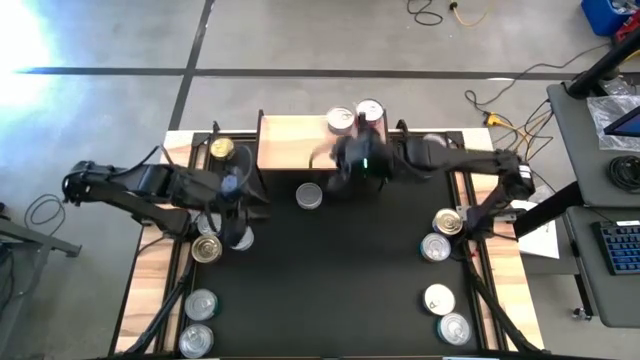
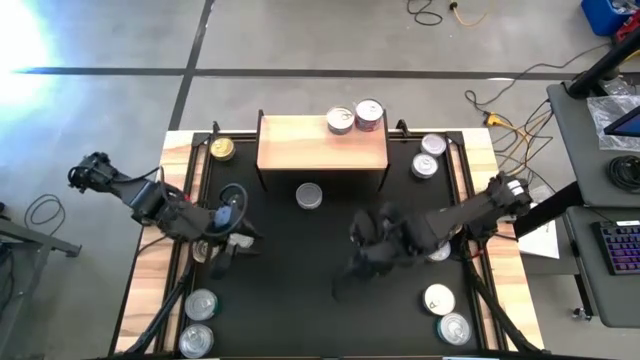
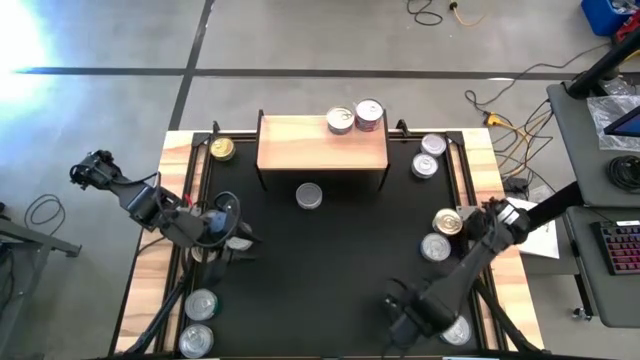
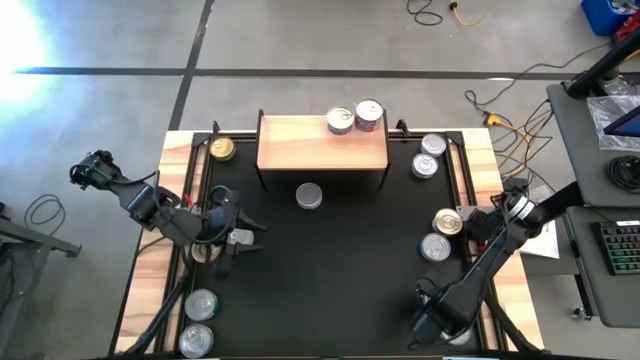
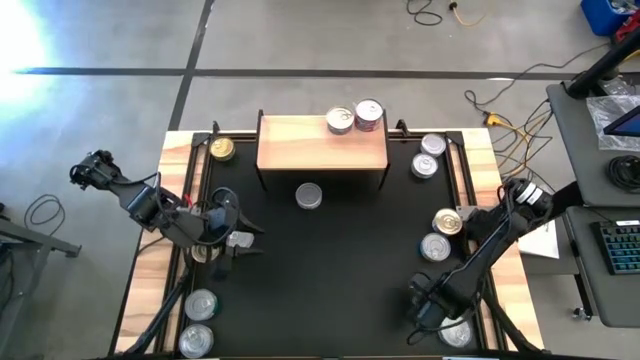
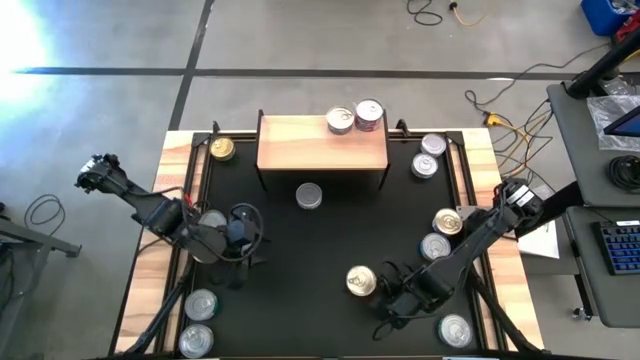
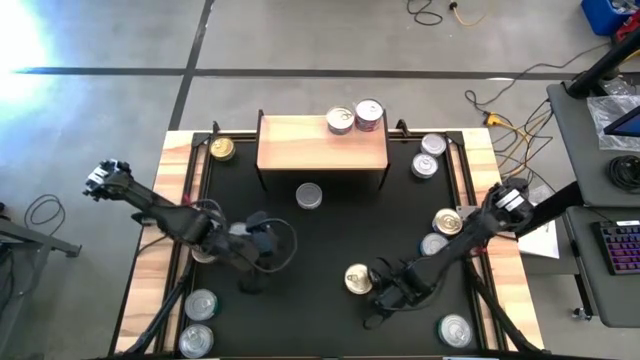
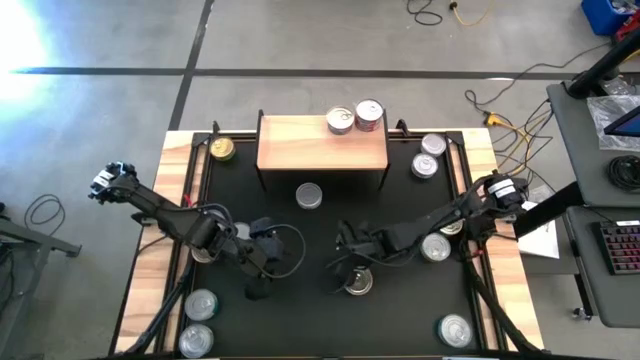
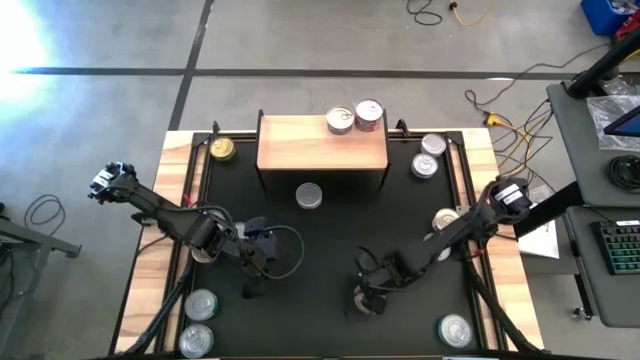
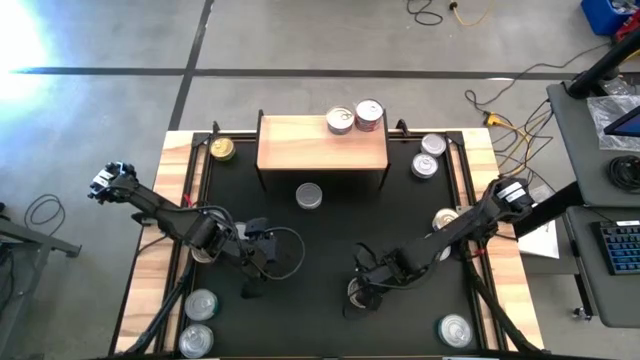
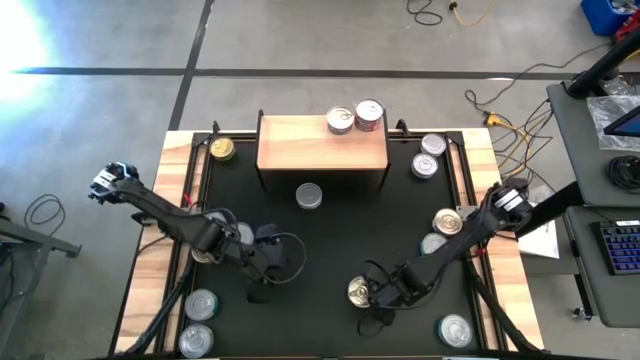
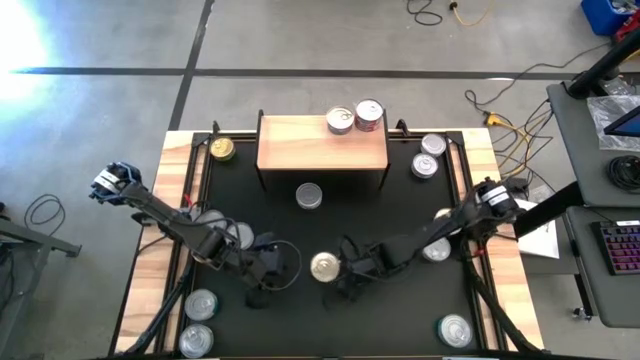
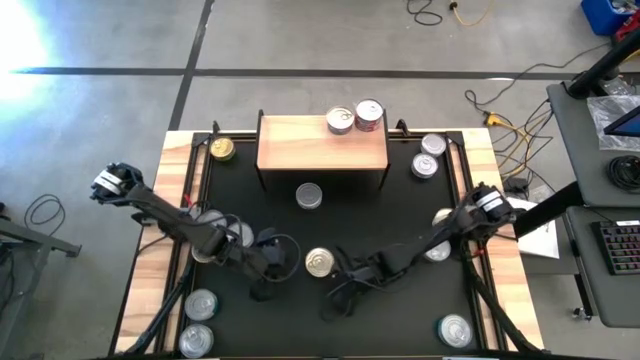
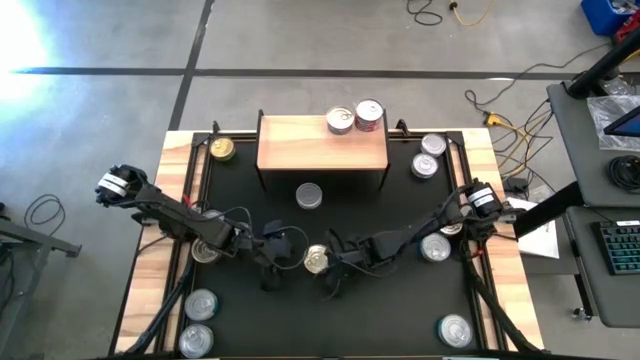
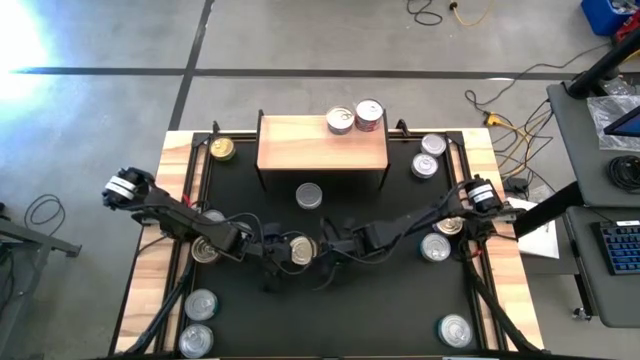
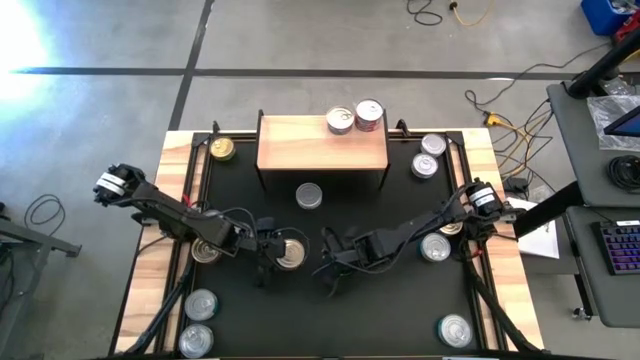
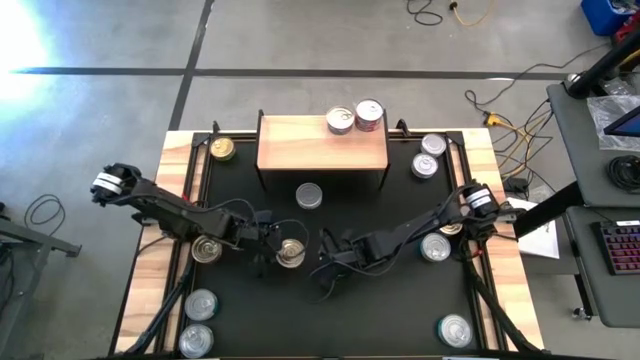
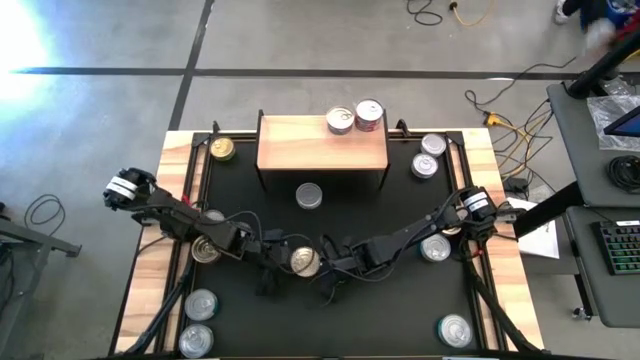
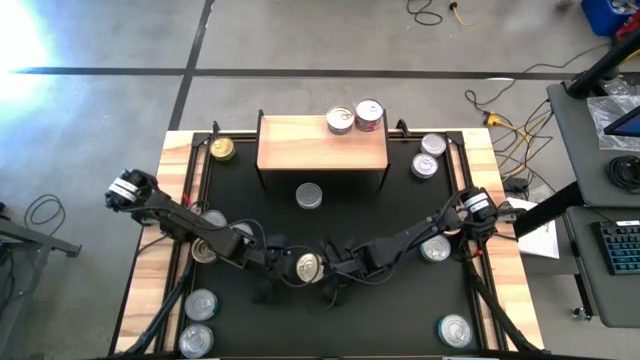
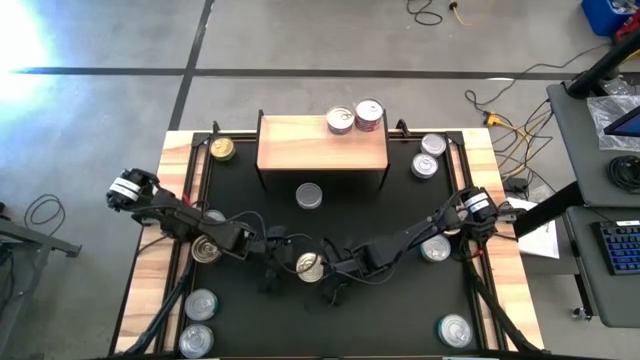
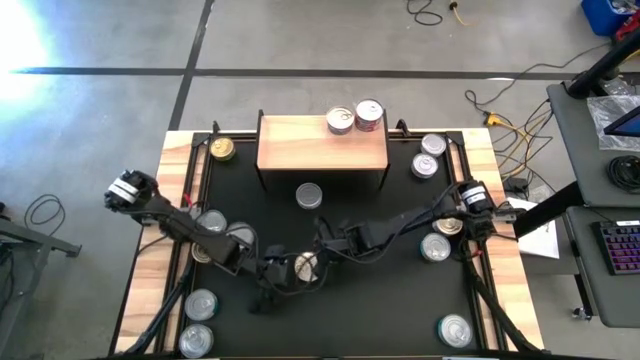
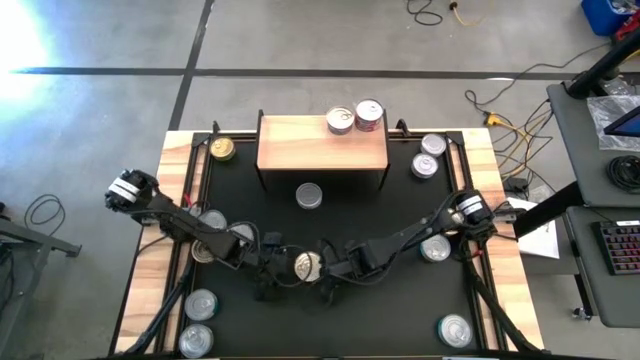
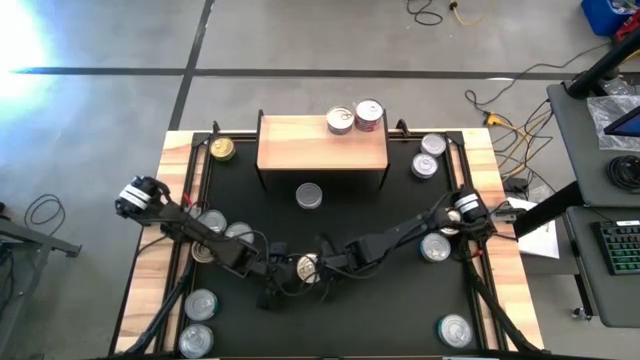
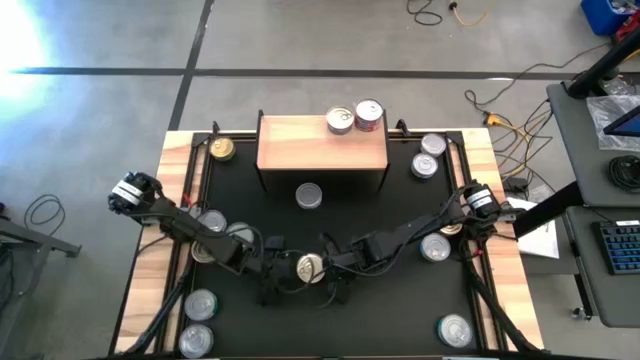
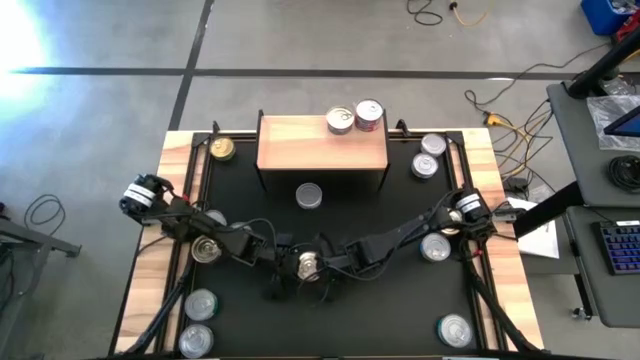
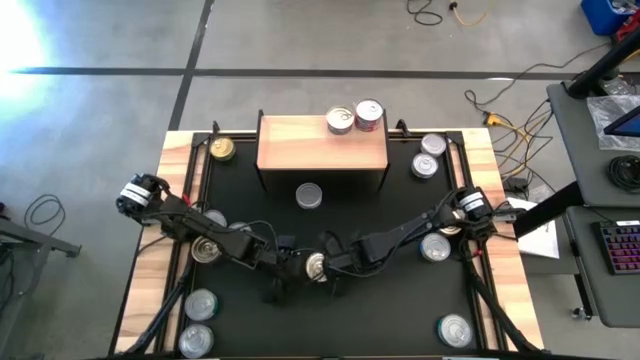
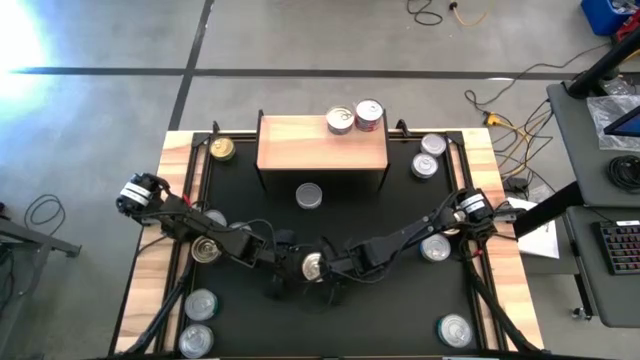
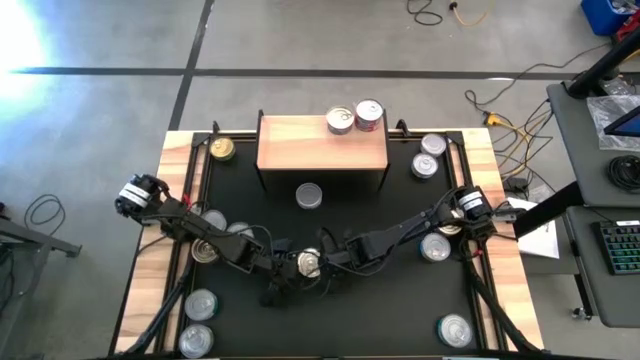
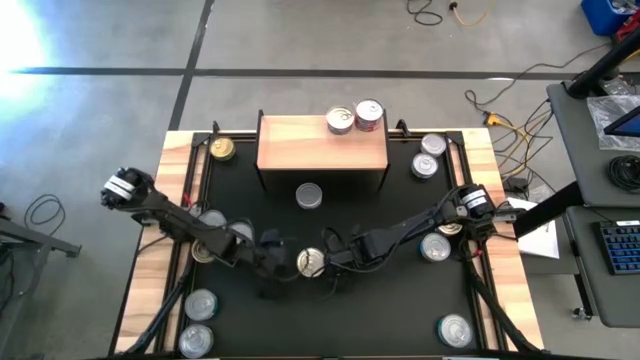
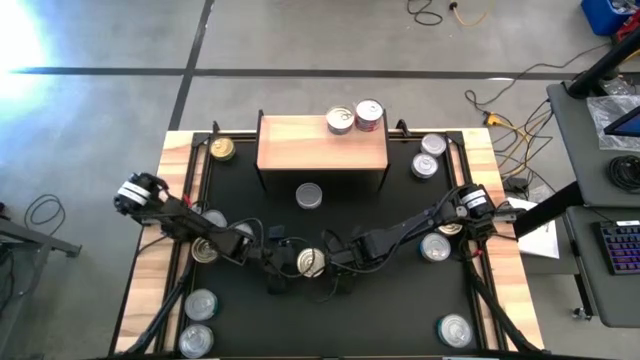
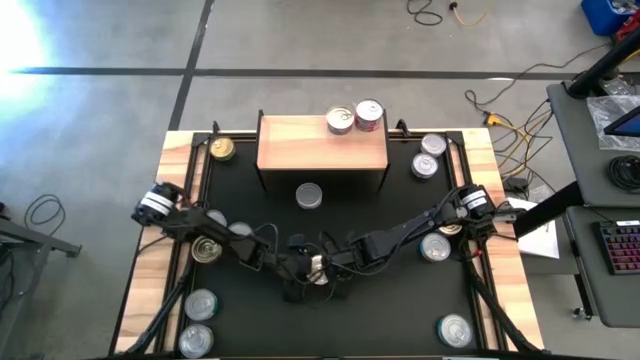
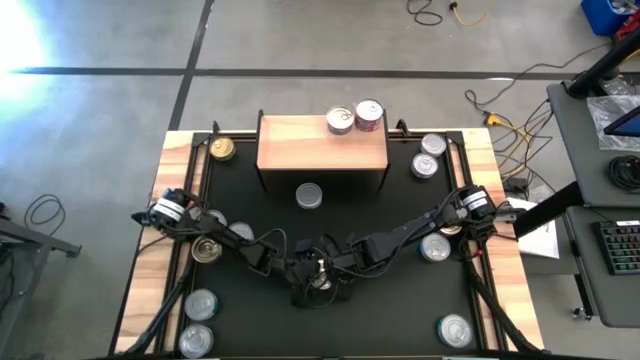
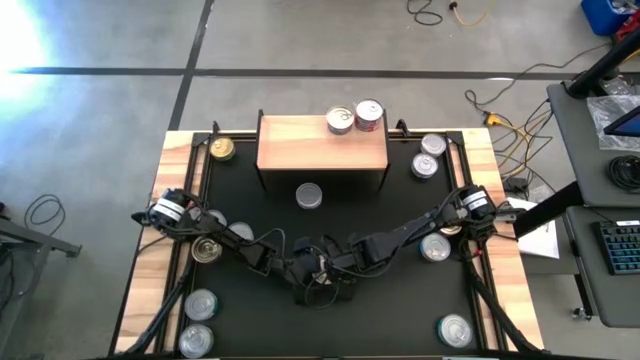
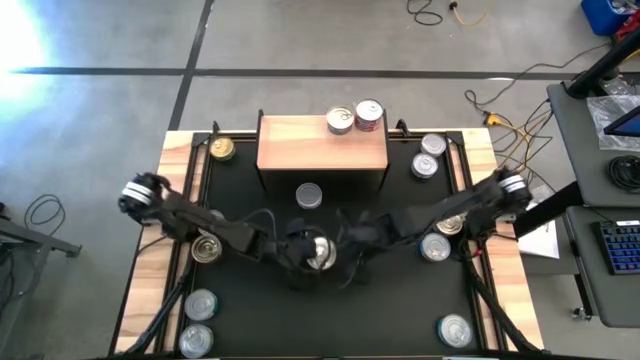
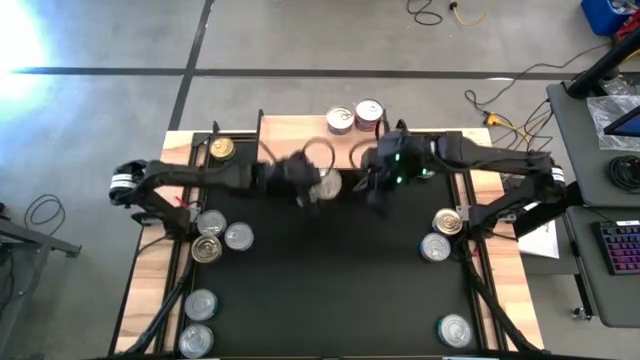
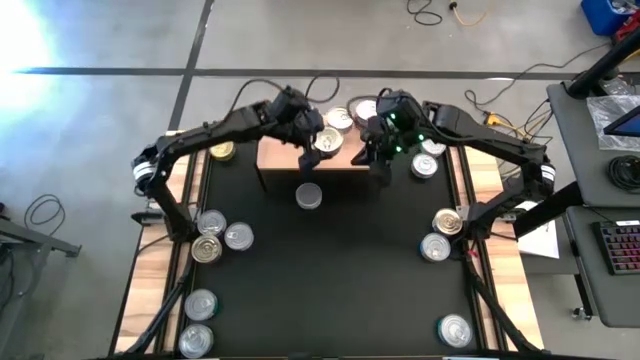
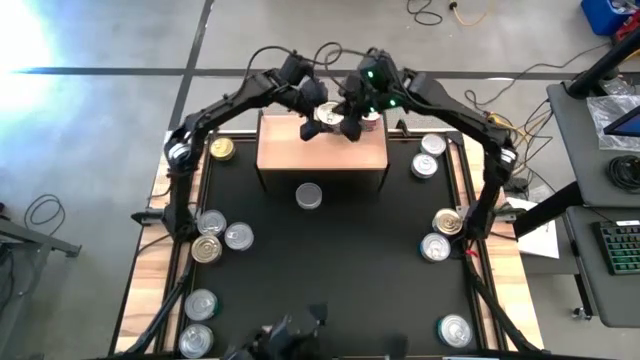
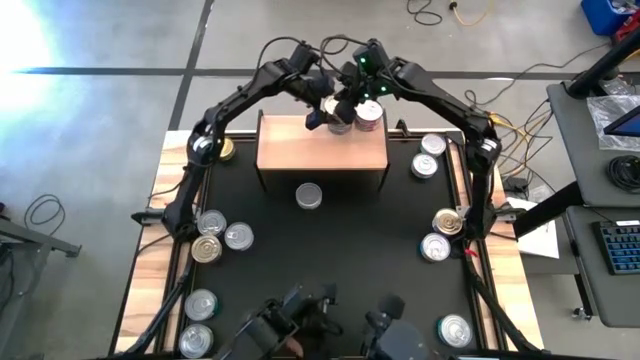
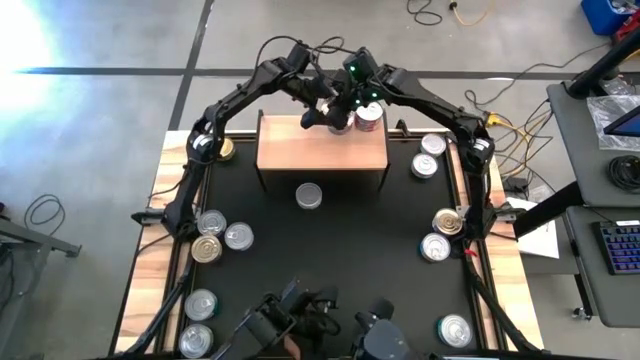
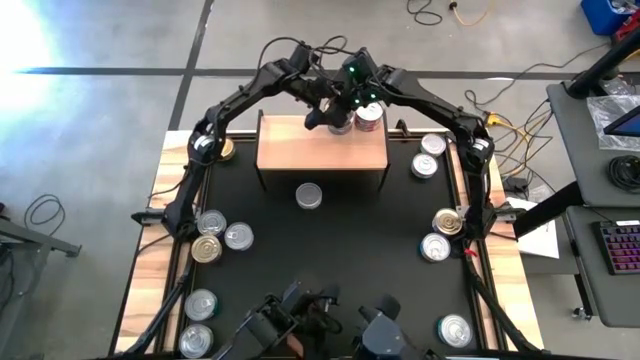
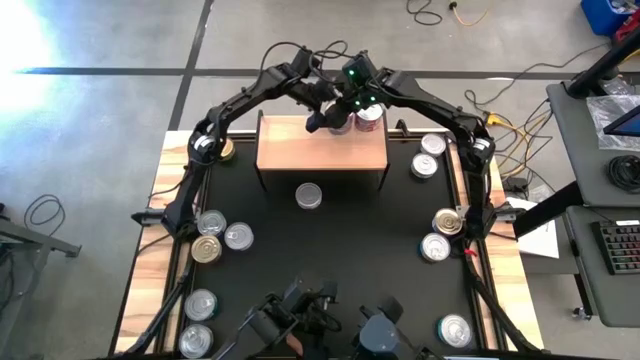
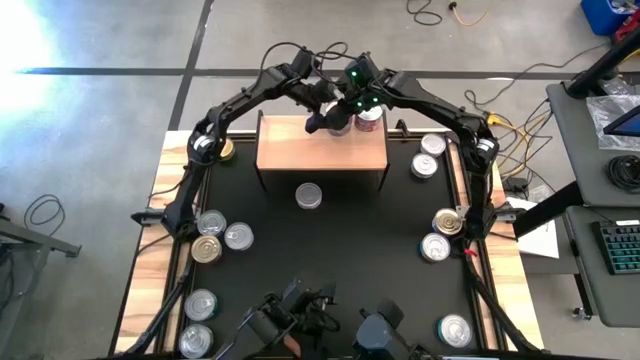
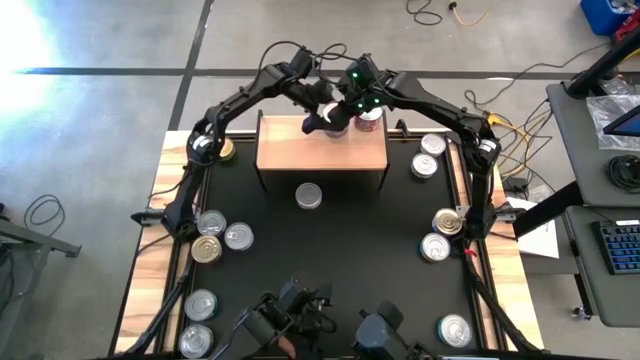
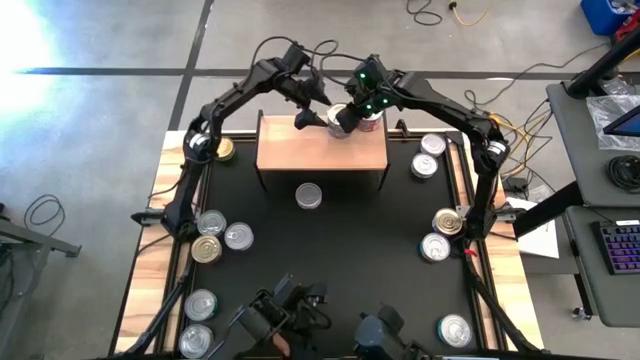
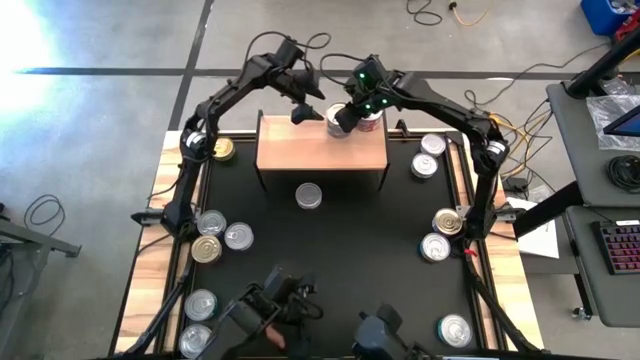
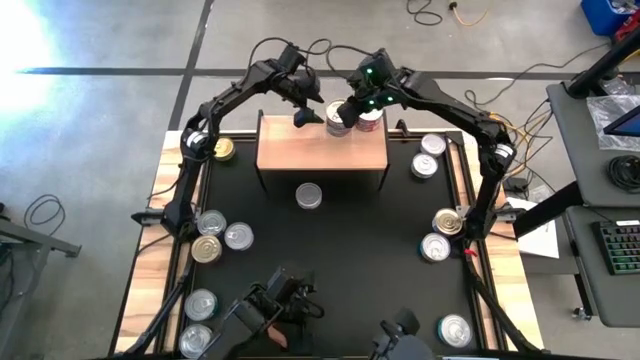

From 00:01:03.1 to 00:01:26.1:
Task: Stack canned seafood by type on shelf
Stack the blue-pink tuna can on top of the other blue-pink tuna can on the shelf
